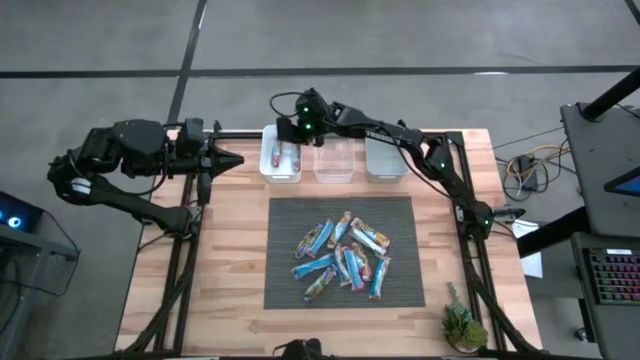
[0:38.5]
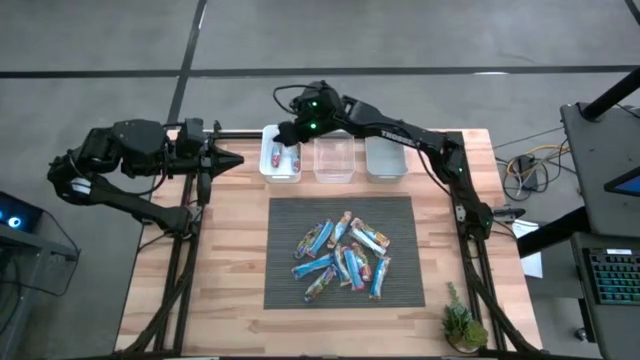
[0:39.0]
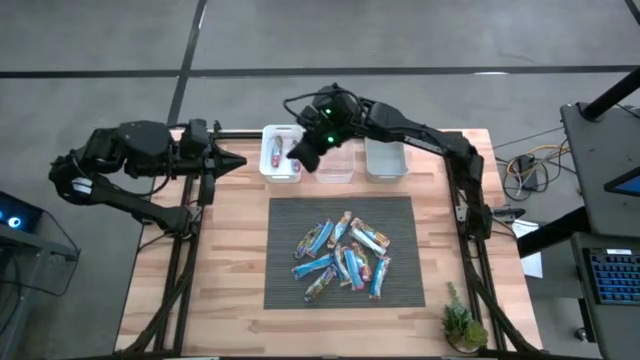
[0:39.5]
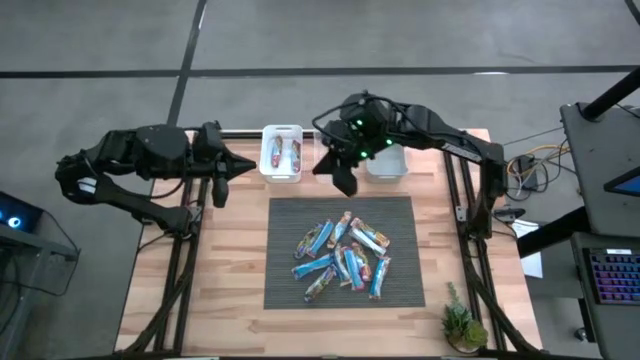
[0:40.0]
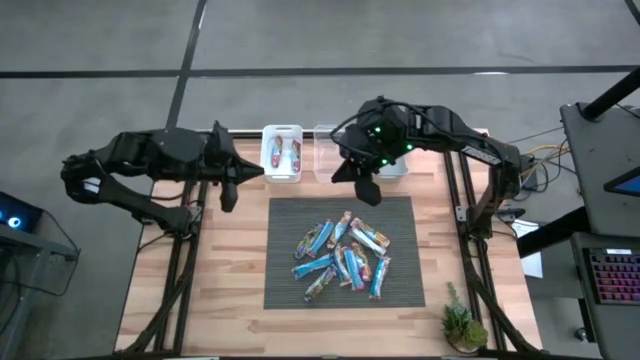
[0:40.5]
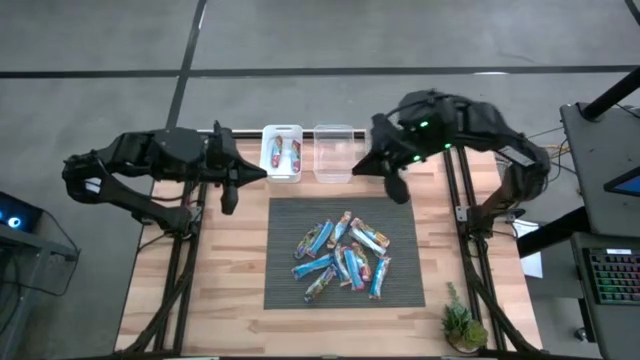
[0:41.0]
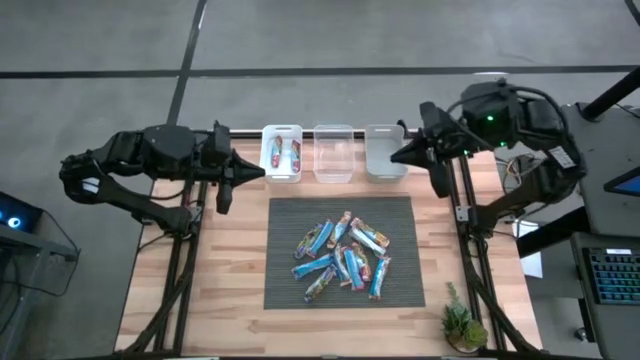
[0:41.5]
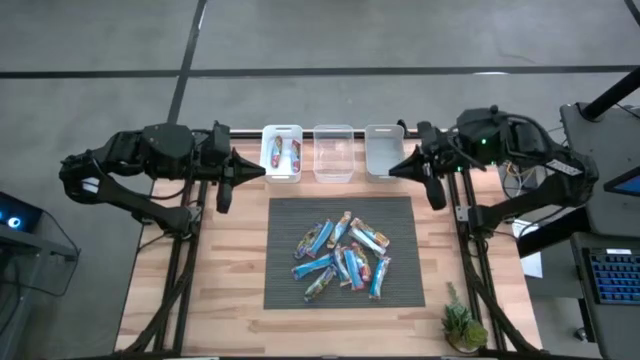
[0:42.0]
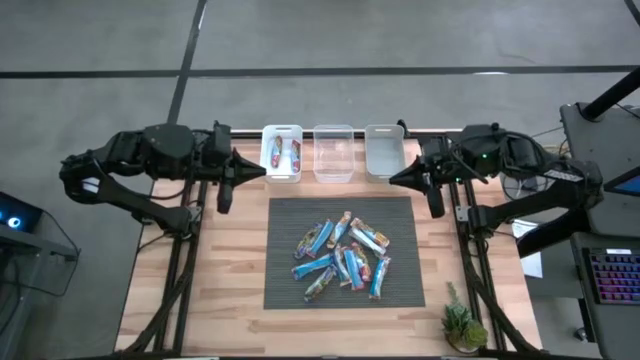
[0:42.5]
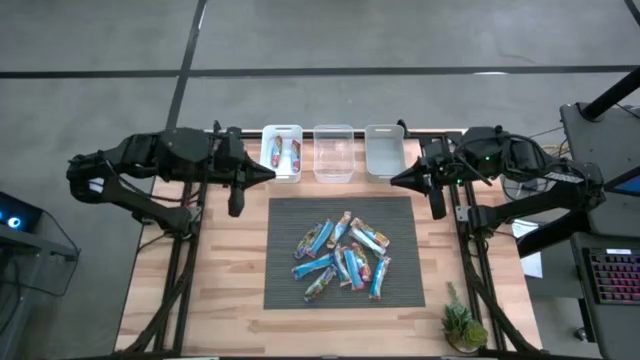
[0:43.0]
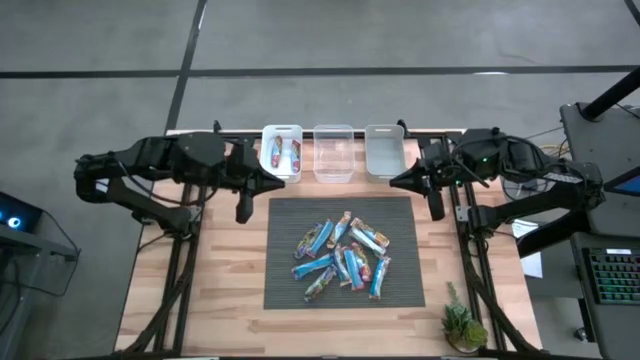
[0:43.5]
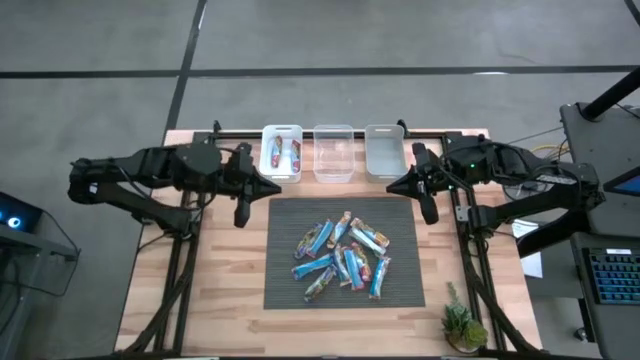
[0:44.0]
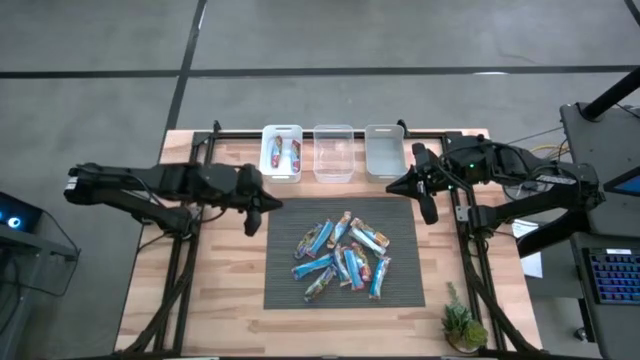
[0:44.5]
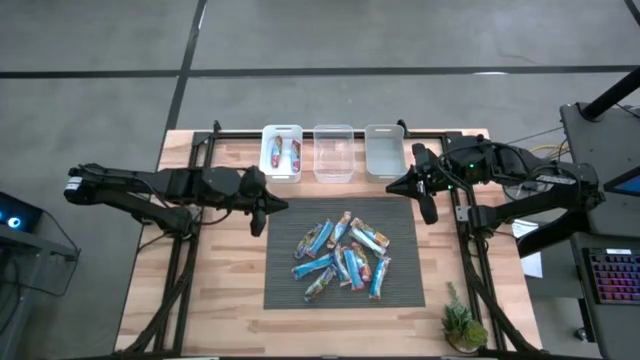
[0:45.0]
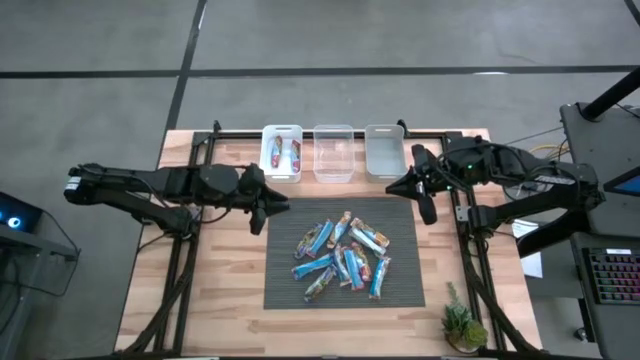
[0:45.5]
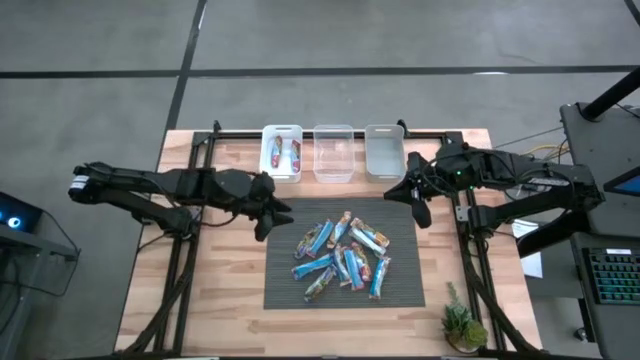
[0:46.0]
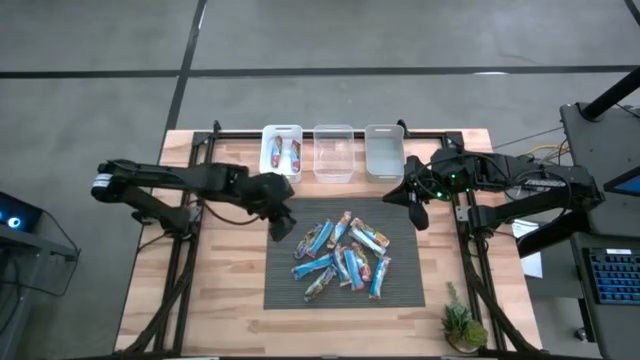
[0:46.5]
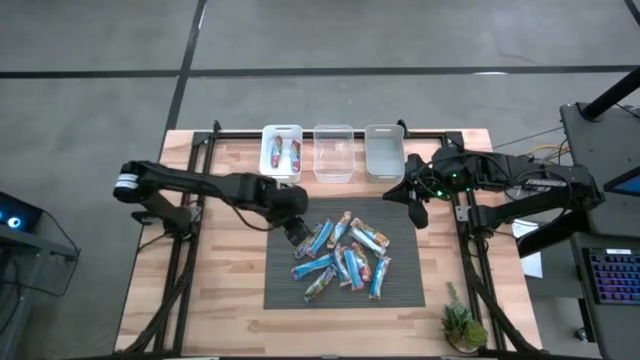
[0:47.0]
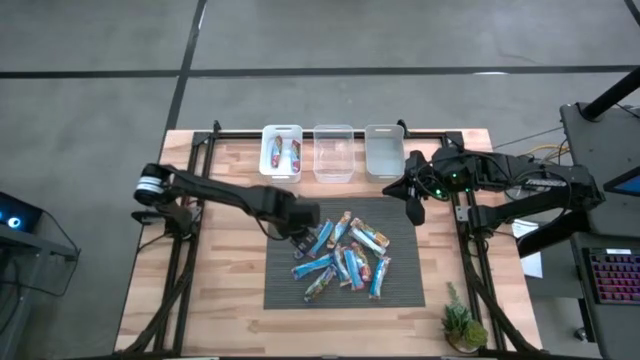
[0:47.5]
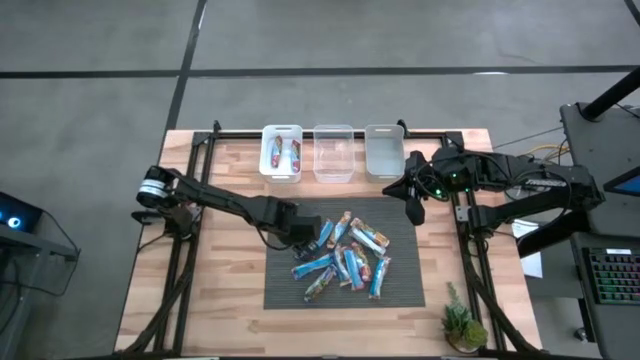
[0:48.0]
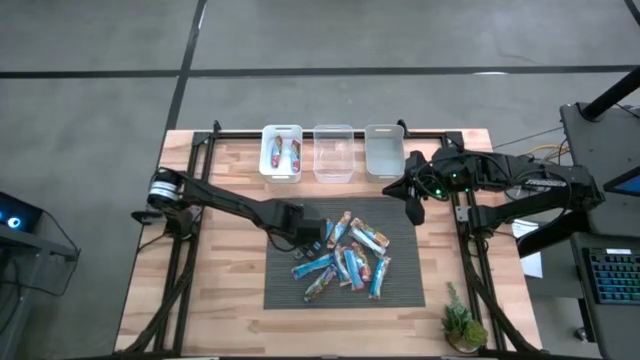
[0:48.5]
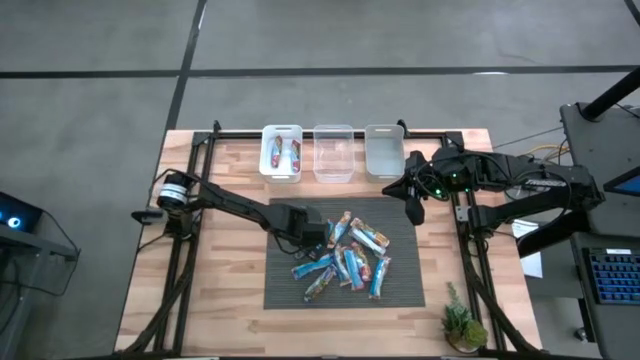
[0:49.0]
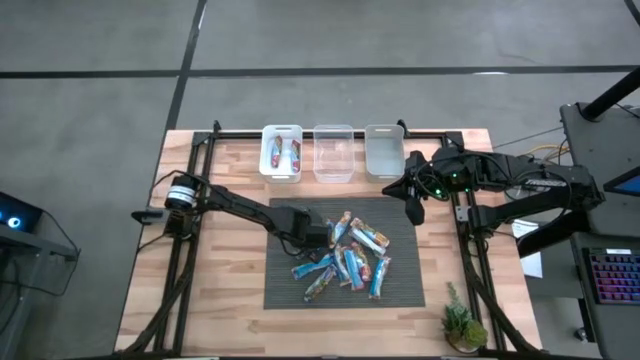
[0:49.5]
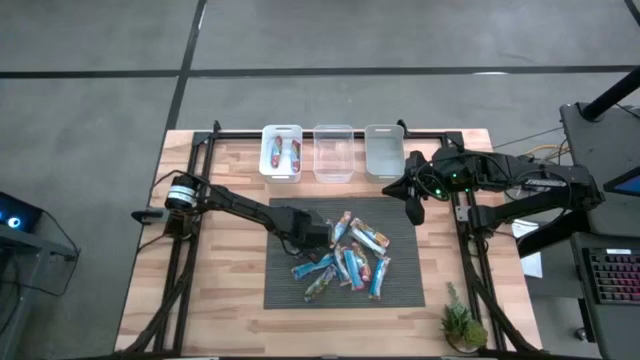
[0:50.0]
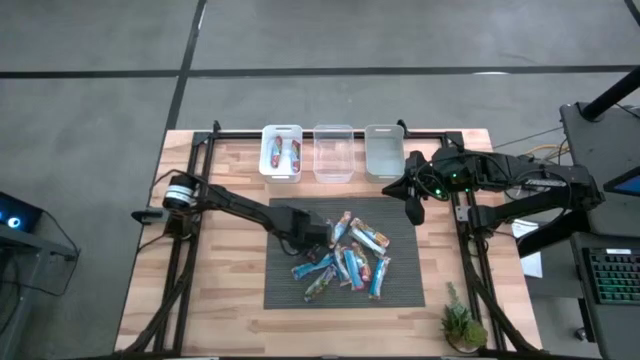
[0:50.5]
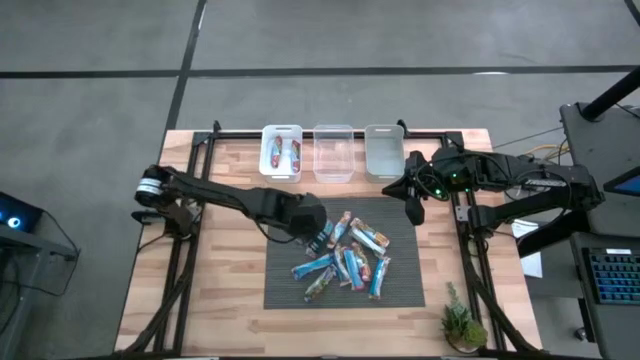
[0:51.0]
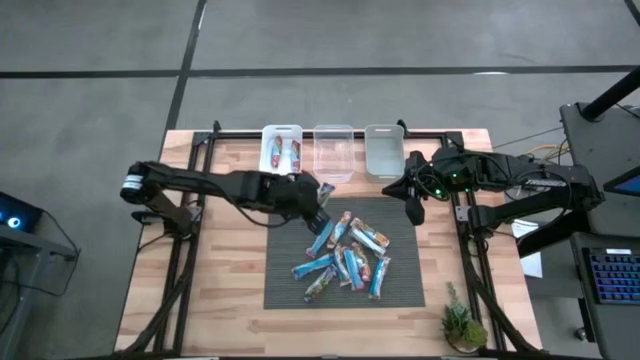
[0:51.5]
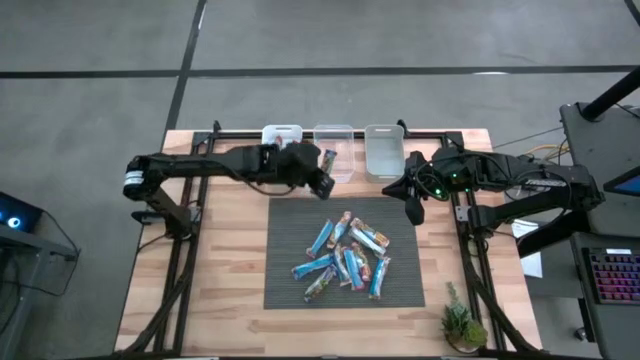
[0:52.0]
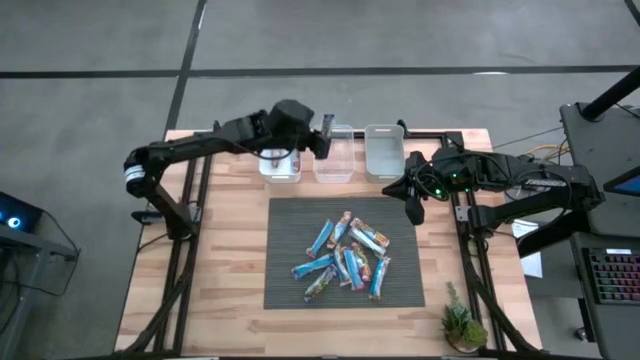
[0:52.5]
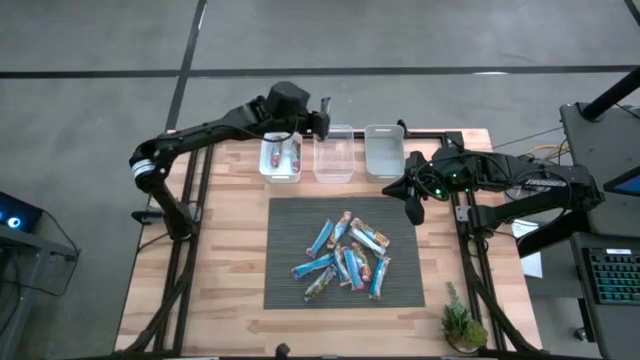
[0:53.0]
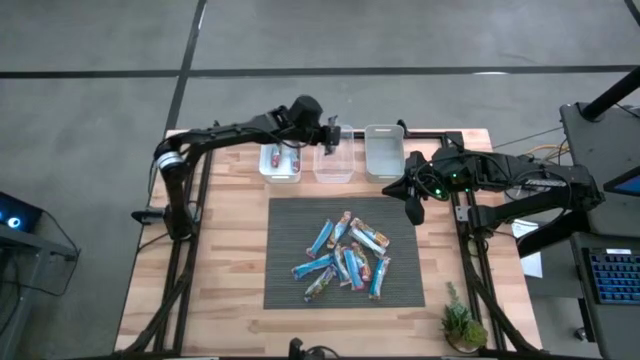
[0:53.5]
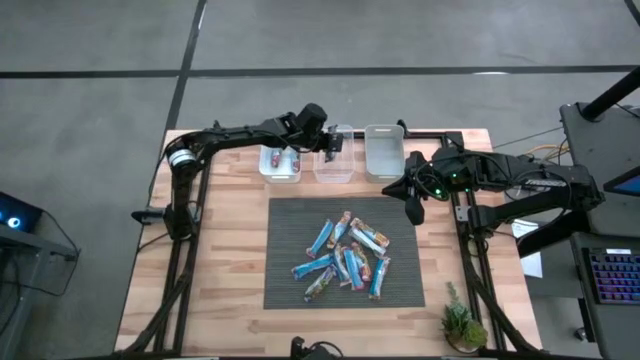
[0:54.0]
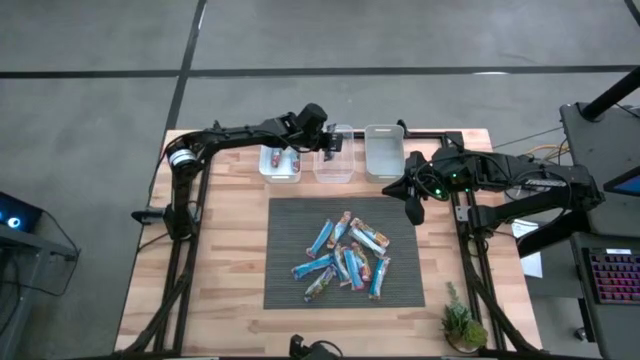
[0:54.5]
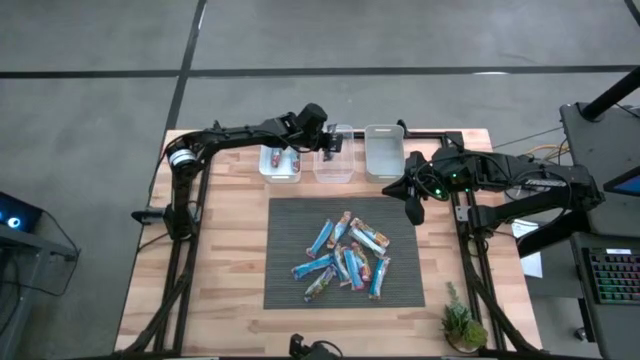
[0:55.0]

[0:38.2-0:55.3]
Task: Pick and place Granola Bars by type
Put the blue granola bar into the transparent bin

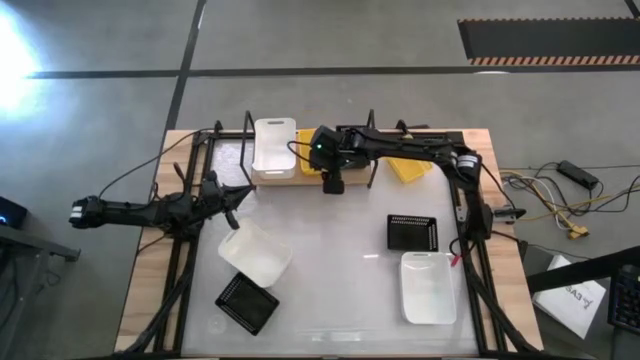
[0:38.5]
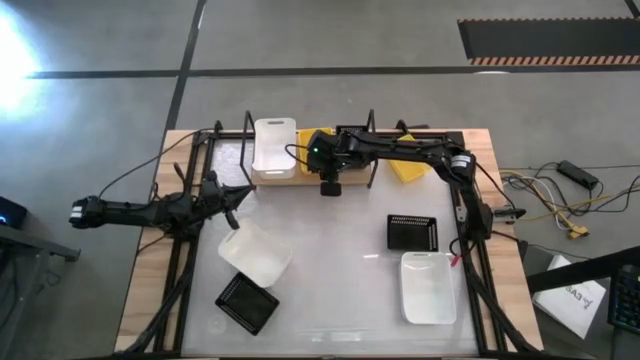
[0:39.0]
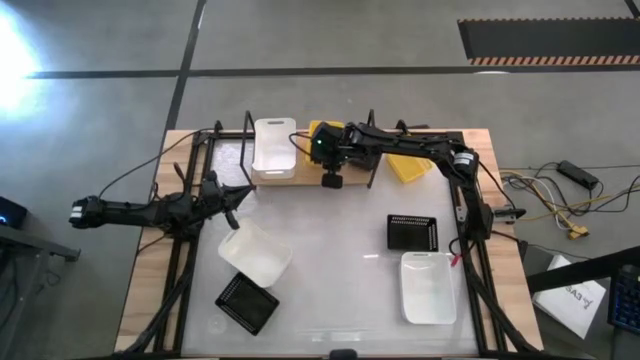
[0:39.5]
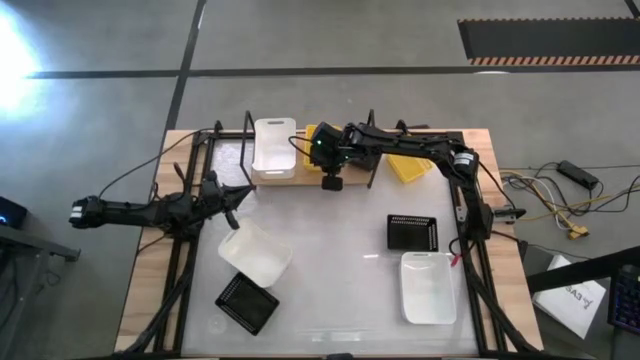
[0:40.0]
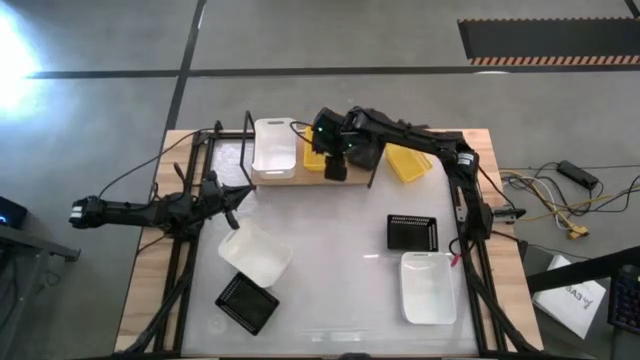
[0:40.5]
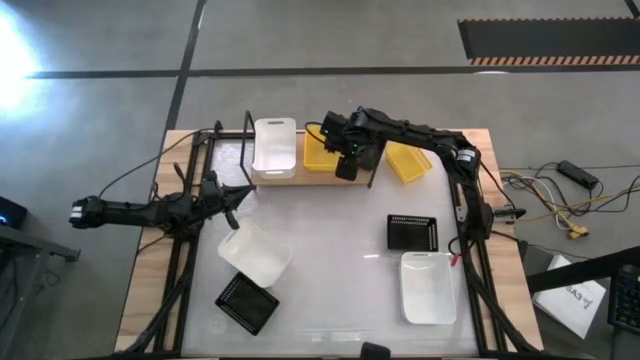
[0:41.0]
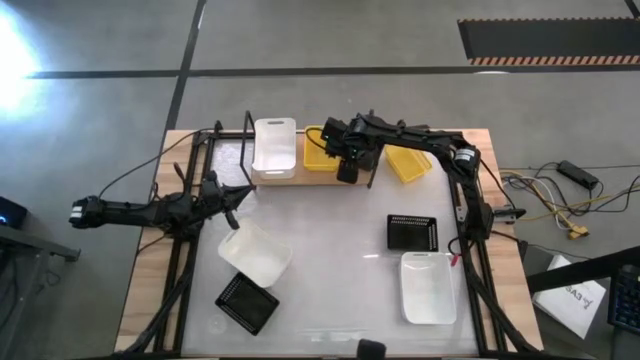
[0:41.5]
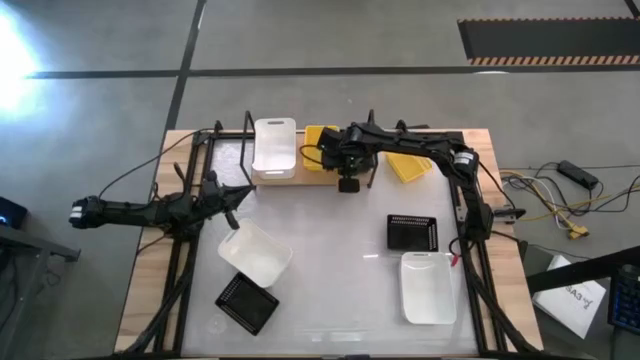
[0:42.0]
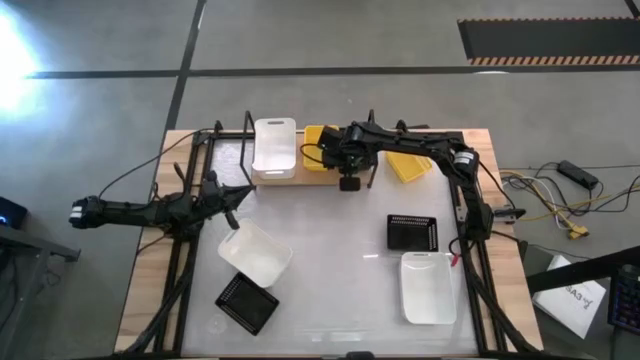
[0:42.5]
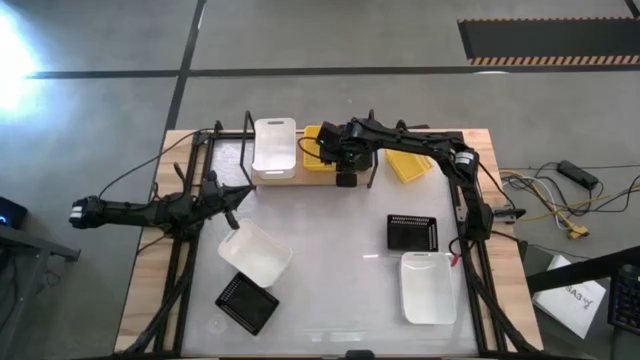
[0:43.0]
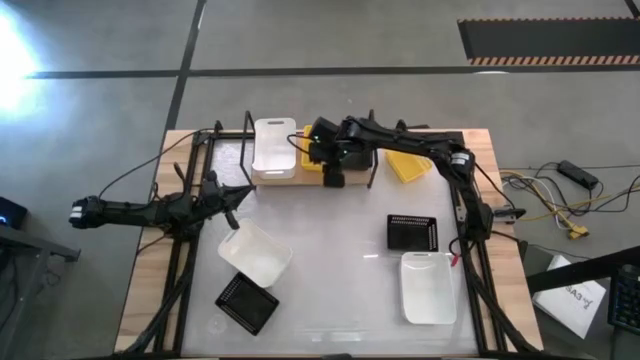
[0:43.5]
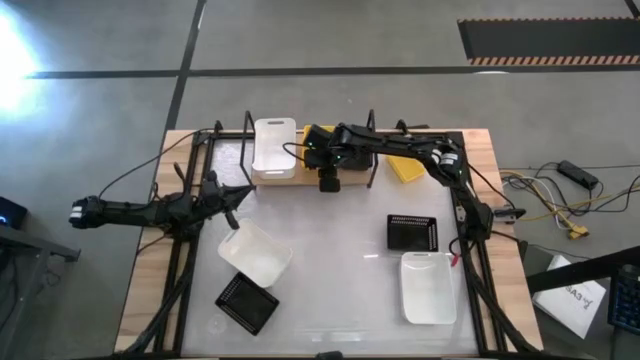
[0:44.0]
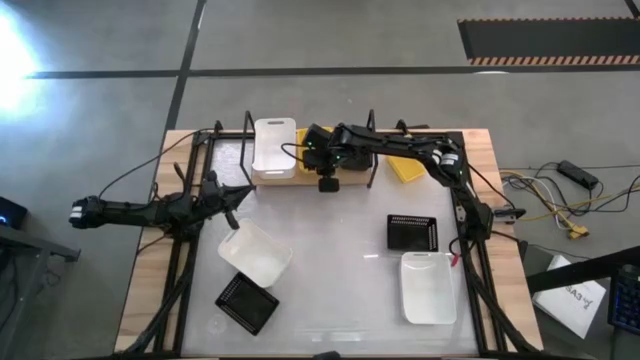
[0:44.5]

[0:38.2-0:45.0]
Task: Stack baskets on shelf by color
Adjust the stacked yellow bins and black bin on the shelf
